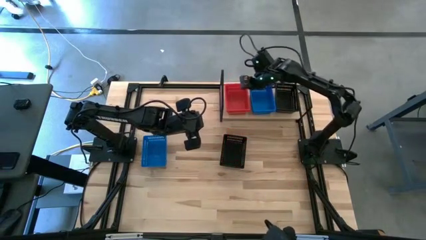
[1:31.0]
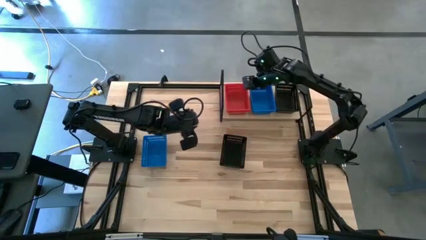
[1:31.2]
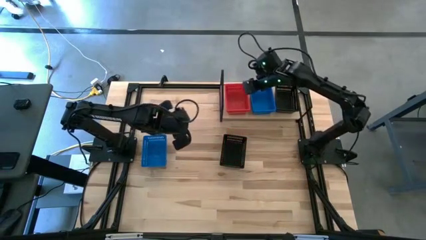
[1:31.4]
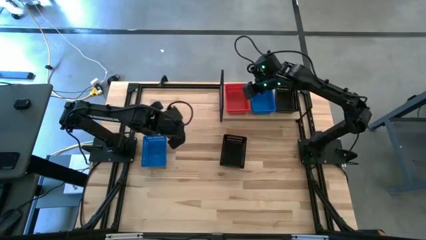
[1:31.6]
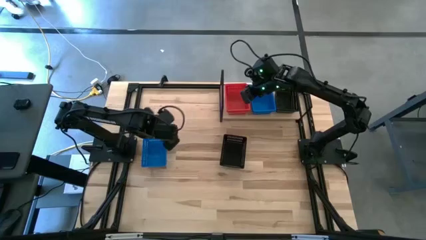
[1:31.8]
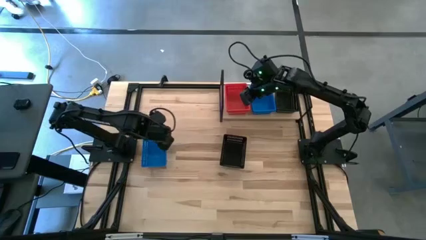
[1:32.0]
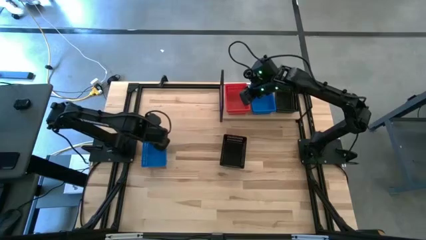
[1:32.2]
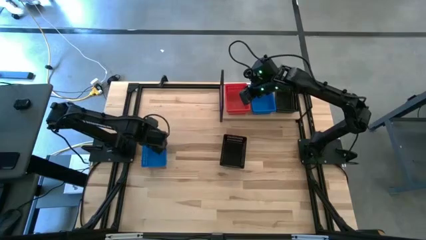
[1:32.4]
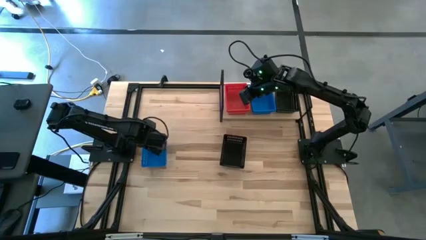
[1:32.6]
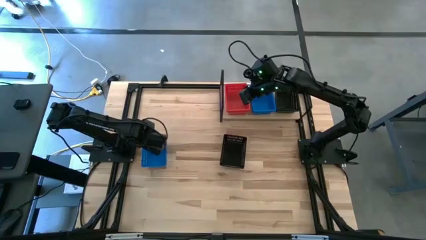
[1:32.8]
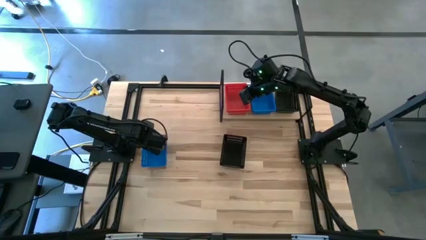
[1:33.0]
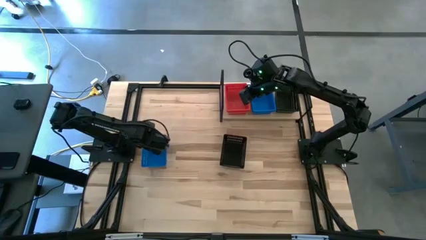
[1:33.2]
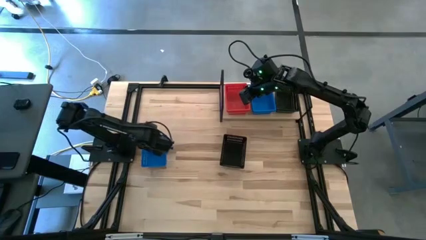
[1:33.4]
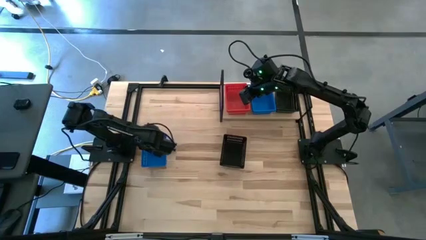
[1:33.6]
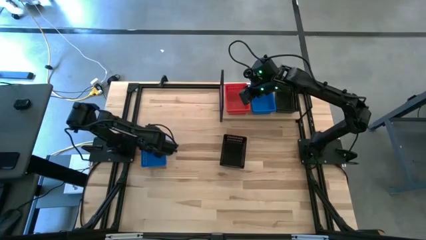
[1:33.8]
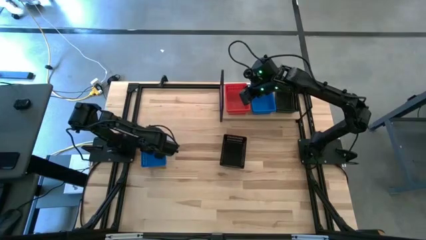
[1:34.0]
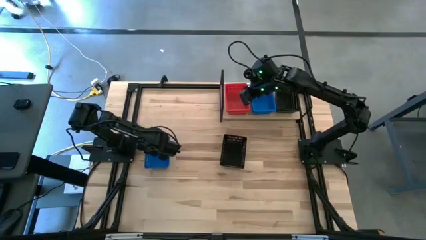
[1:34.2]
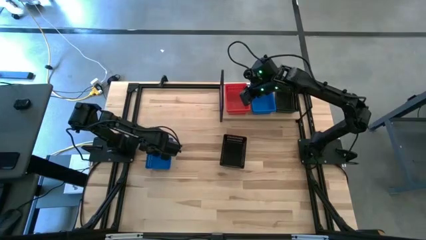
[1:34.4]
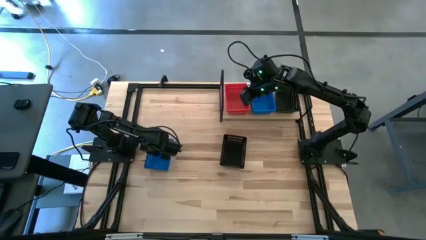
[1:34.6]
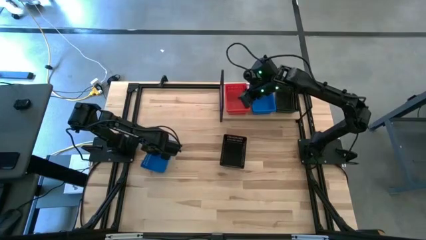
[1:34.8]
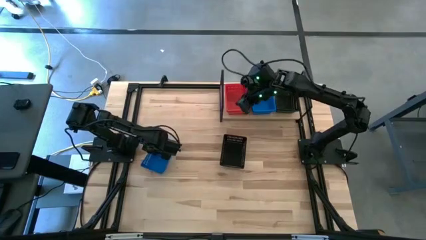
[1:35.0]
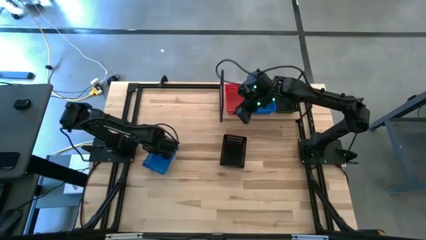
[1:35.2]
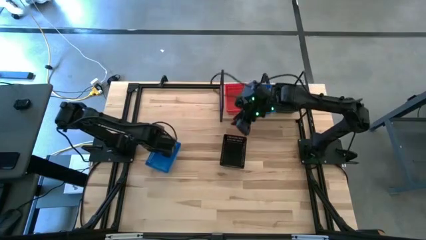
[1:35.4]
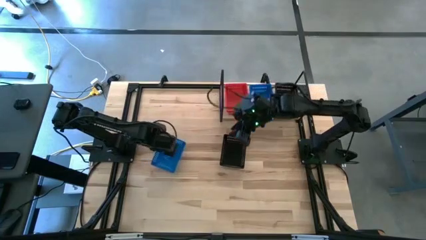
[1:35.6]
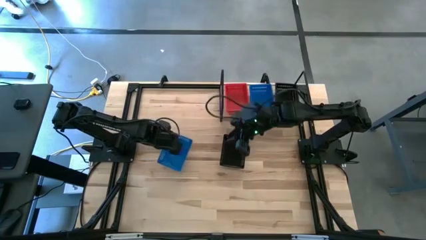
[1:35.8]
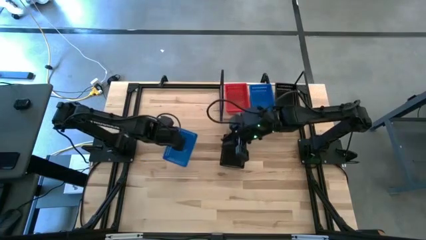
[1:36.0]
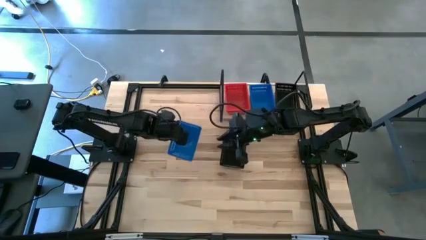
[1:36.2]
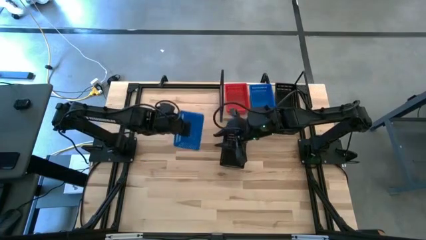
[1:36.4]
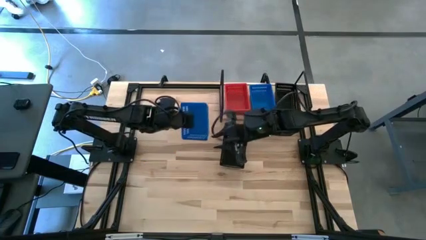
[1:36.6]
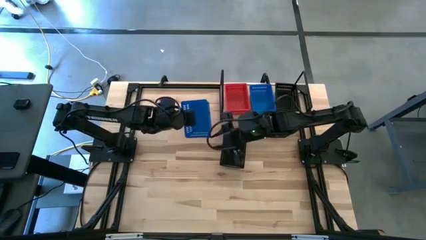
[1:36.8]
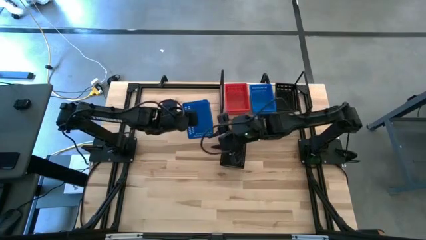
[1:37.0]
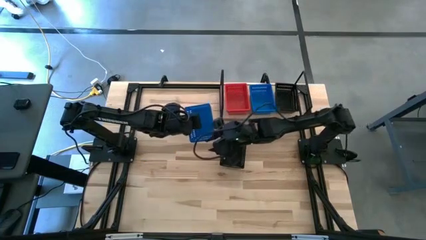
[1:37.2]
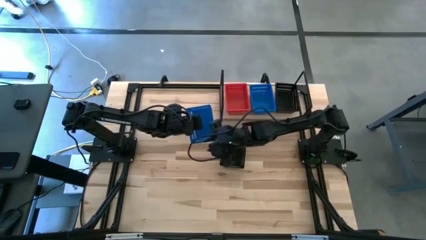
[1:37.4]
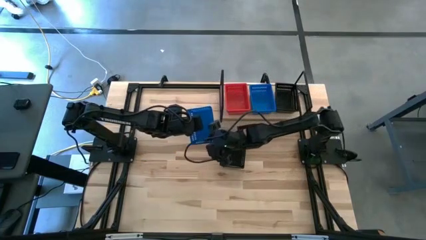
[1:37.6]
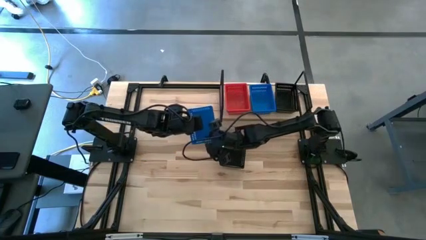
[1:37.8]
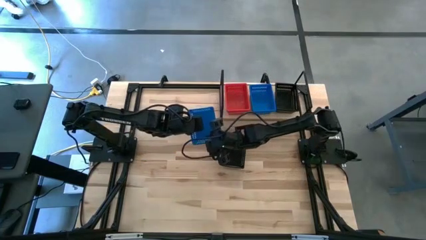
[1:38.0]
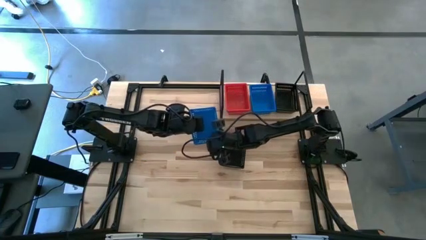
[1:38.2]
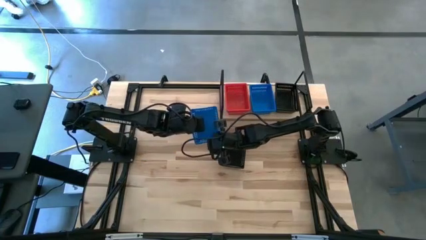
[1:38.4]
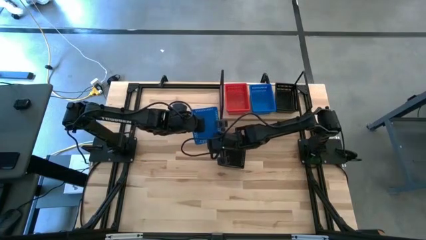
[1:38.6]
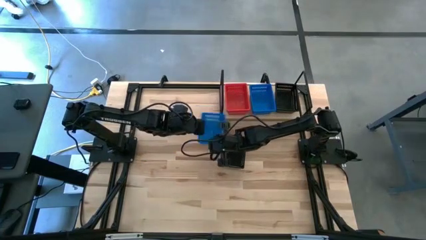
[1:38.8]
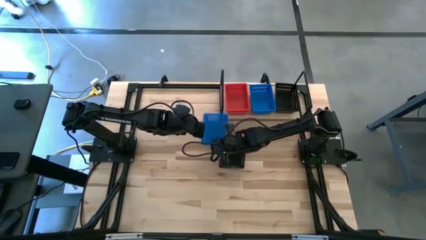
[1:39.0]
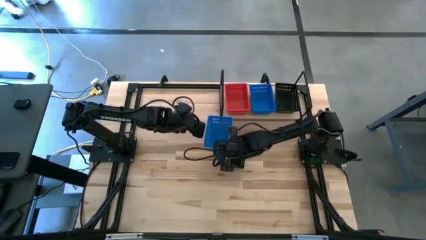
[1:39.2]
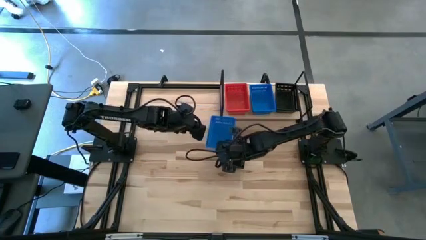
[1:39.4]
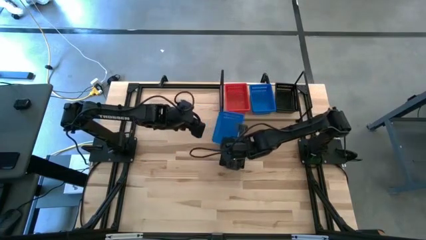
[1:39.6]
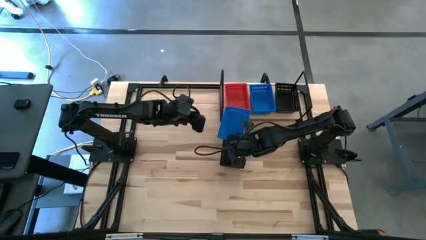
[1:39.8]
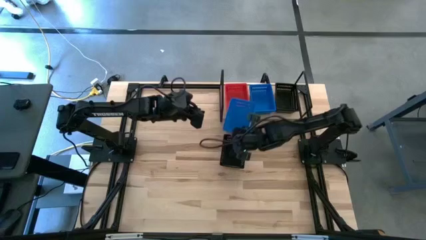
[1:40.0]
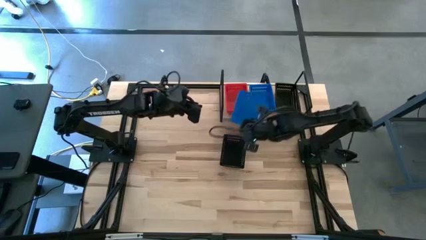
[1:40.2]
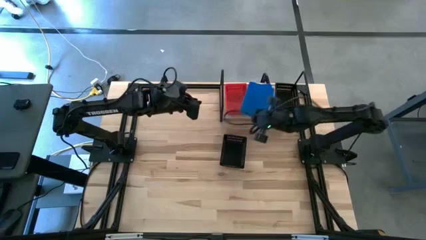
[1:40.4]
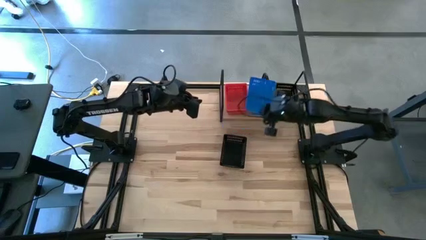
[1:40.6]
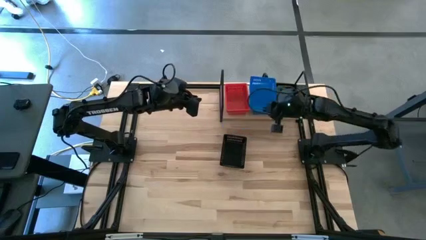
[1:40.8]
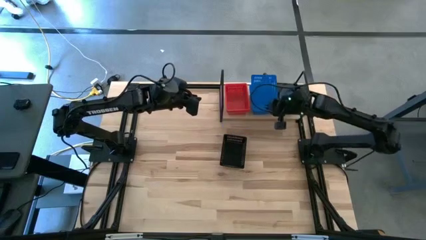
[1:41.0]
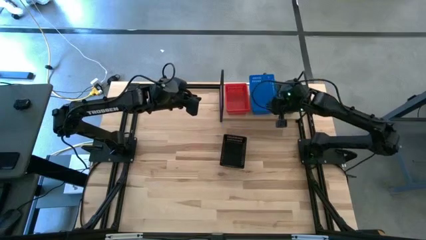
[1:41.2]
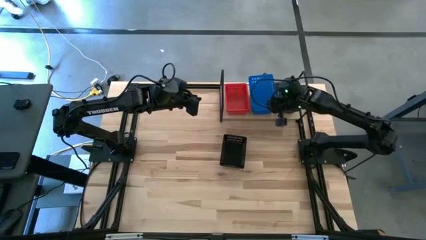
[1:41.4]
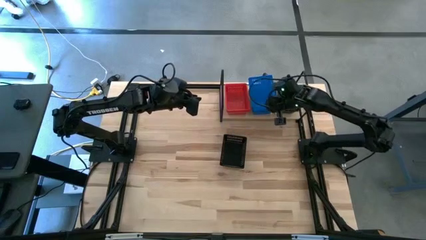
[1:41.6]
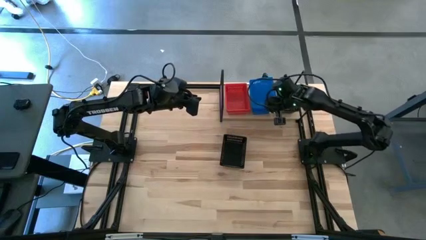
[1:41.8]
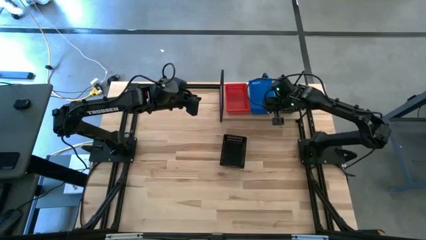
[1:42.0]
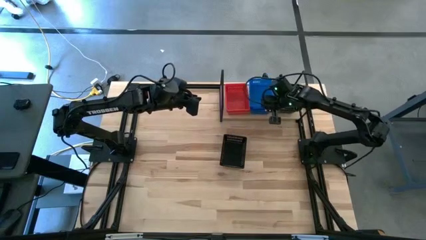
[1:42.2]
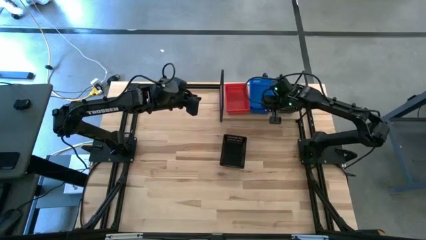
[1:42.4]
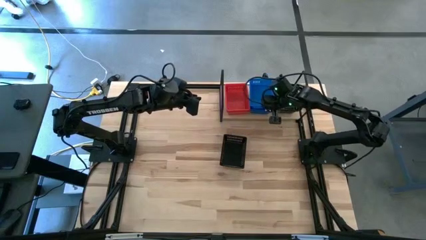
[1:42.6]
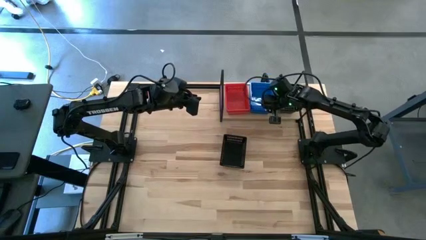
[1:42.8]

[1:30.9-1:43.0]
Task: Stack baskets on shelf by color
Stack the blue bin on the other blue bins on the shelf

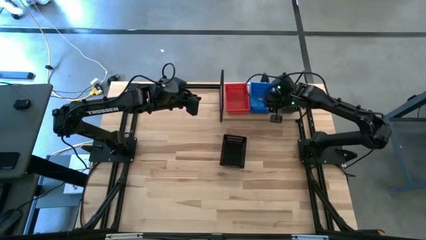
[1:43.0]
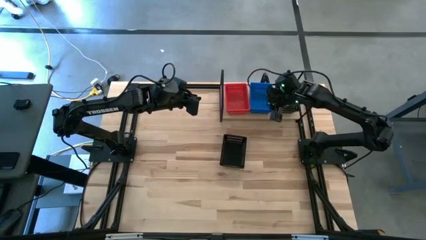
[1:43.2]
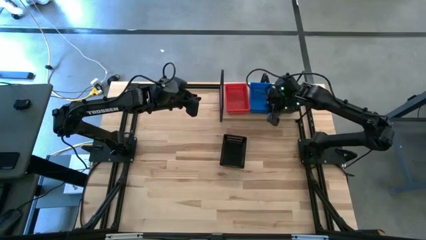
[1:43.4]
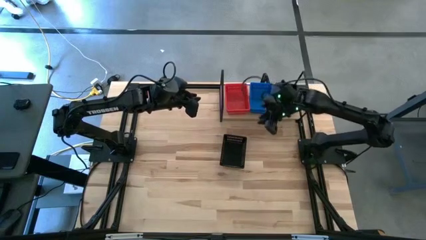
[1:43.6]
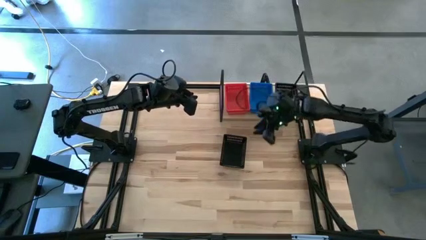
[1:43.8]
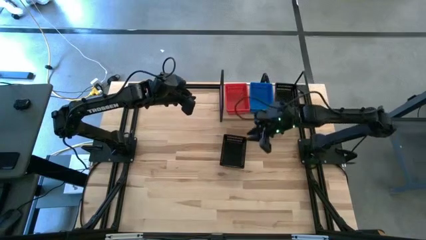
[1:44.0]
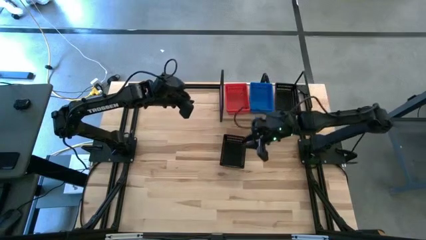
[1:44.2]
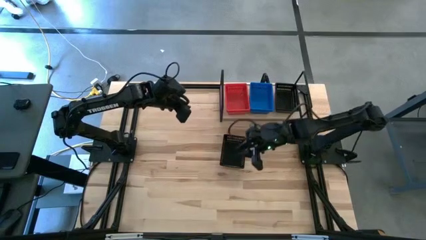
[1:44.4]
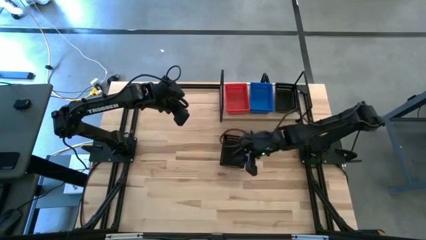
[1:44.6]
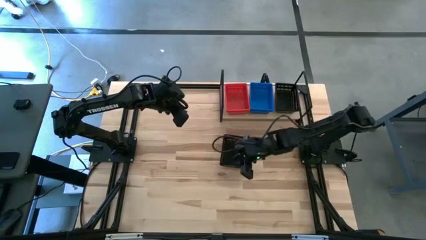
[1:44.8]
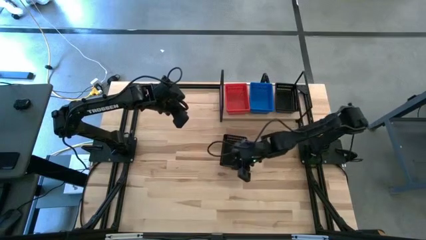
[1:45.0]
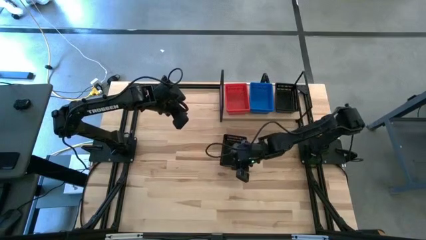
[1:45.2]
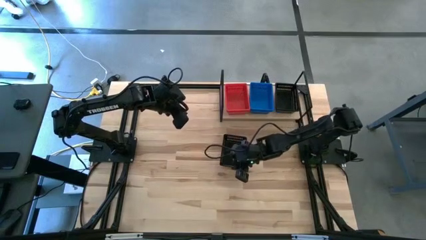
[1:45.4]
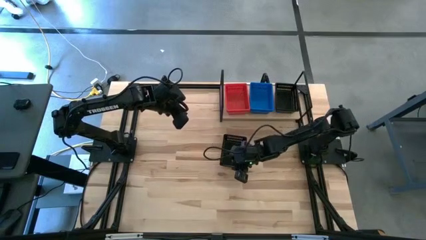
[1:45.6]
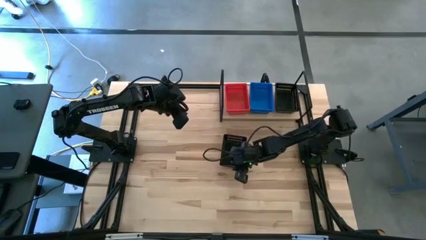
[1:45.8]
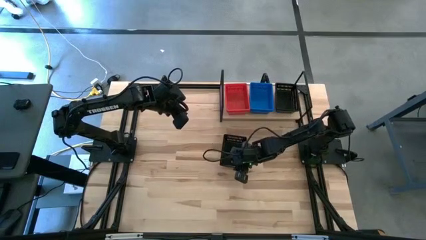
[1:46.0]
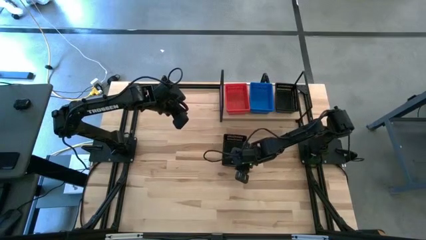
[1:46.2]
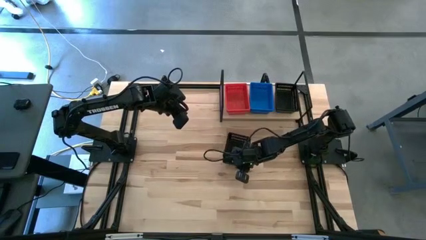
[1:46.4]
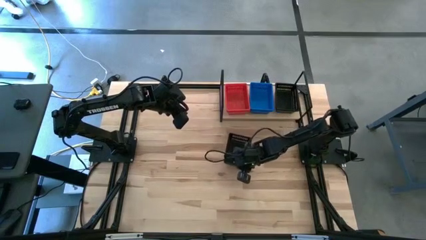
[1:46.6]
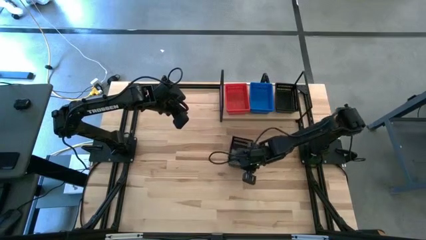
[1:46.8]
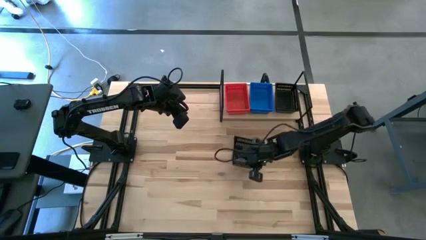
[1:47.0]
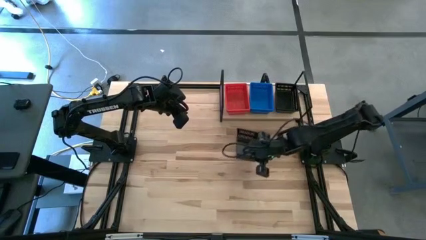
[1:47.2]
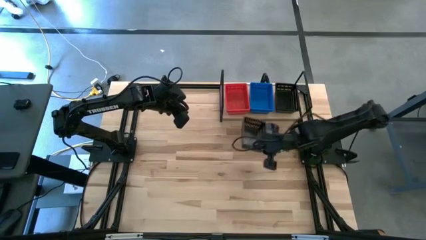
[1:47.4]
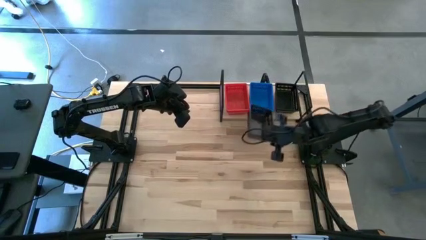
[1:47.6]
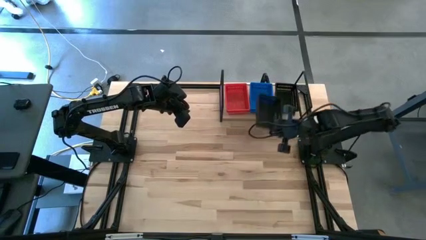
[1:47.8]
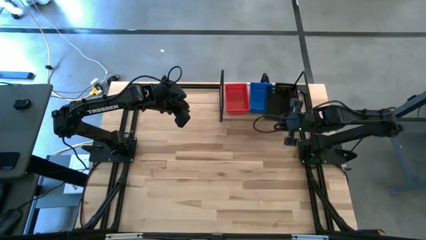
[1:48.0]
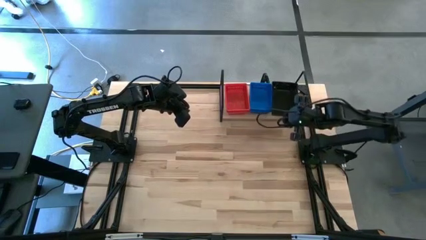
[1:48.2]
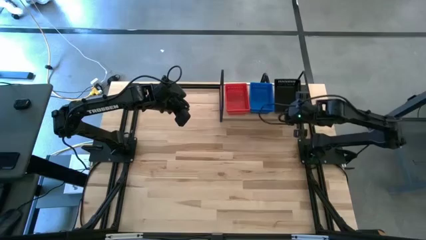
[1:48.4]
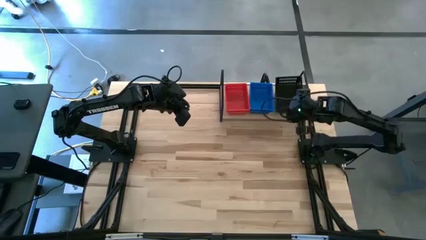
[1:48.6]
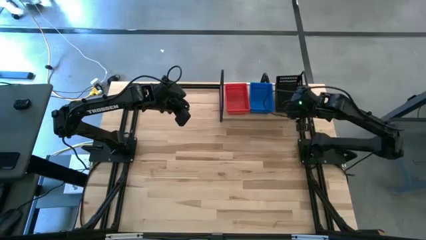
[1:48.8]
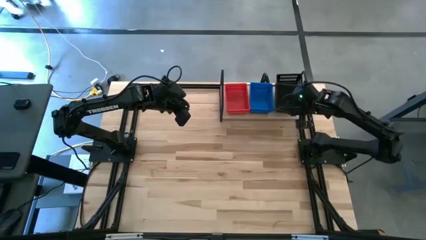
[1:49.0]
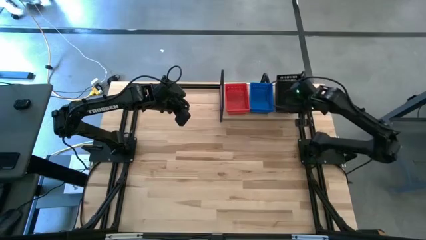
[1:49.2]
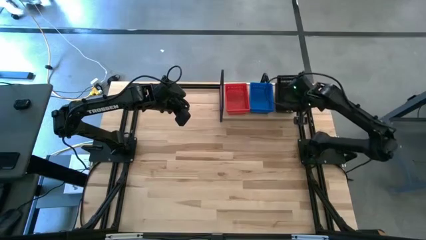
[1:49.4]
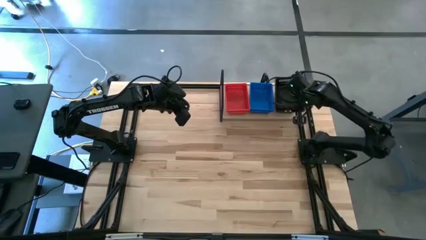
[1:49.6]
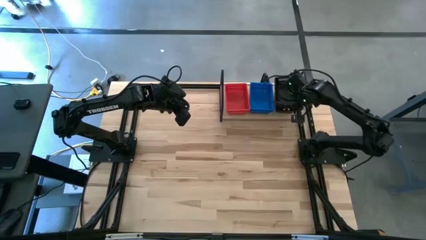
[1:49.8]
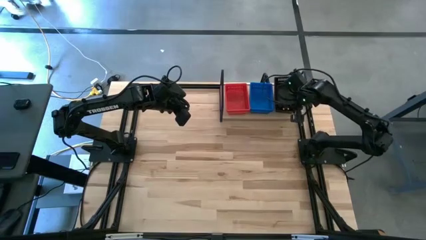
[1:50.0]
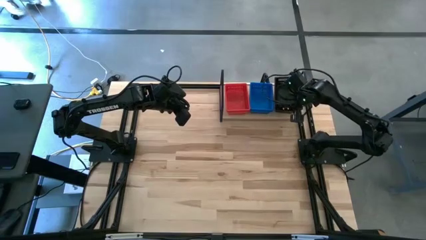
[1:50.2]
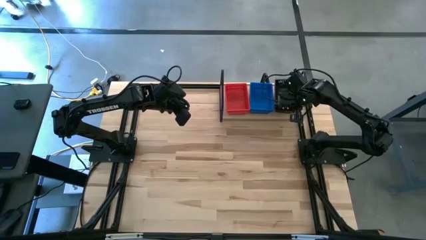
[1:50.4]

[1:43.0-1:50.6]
Stack the black bin on the other black bins on the shelf
